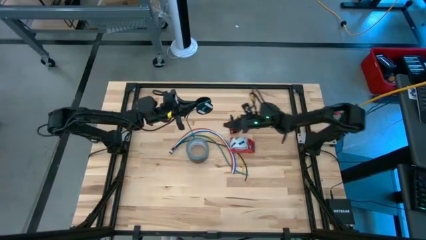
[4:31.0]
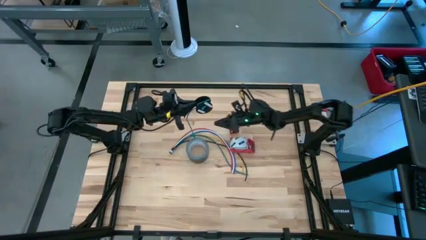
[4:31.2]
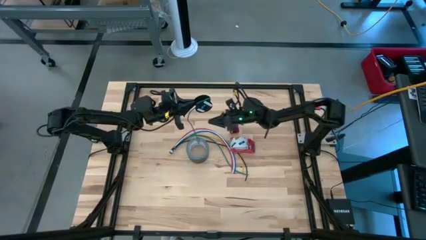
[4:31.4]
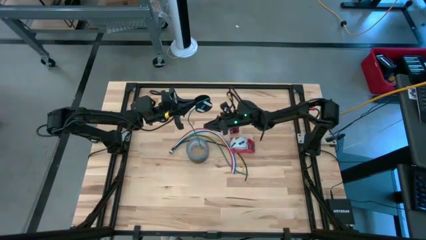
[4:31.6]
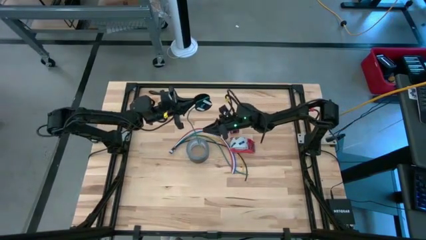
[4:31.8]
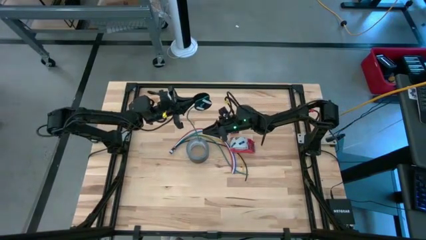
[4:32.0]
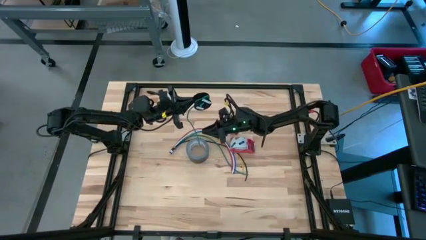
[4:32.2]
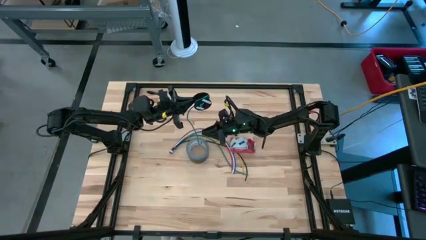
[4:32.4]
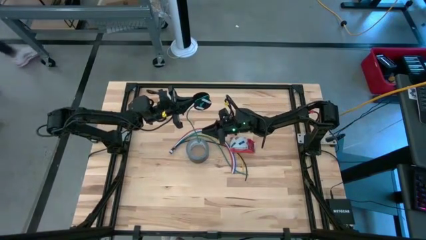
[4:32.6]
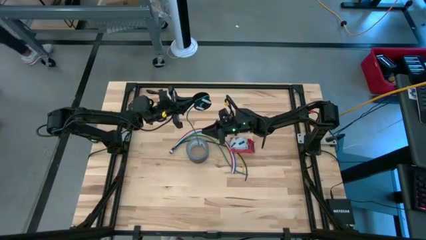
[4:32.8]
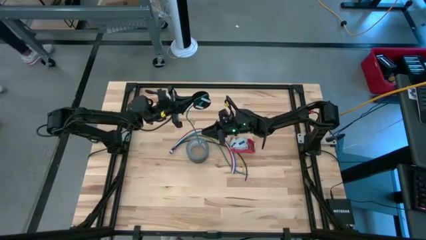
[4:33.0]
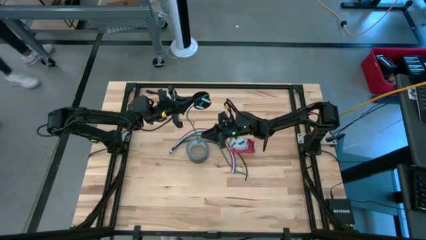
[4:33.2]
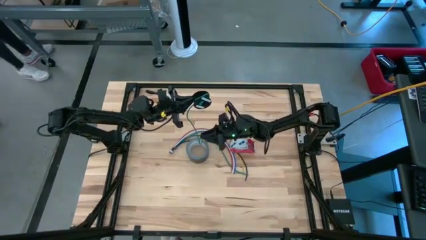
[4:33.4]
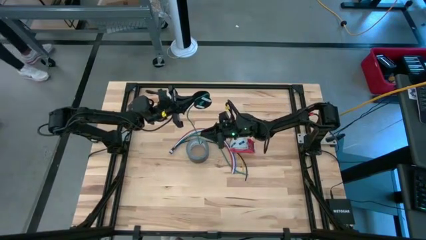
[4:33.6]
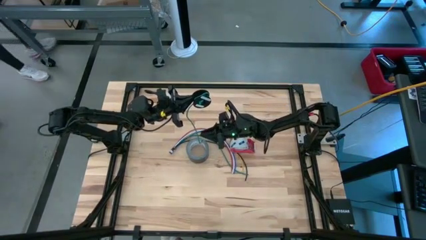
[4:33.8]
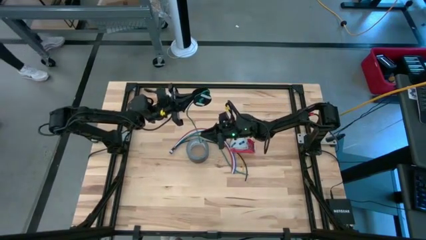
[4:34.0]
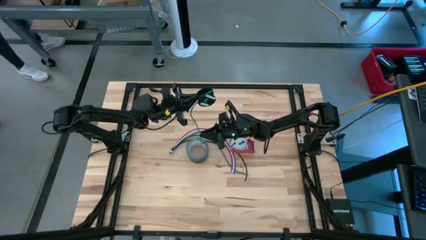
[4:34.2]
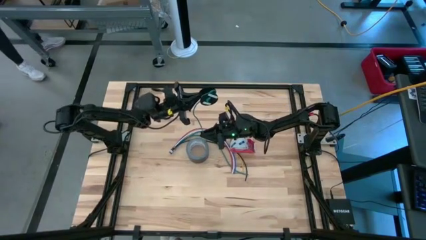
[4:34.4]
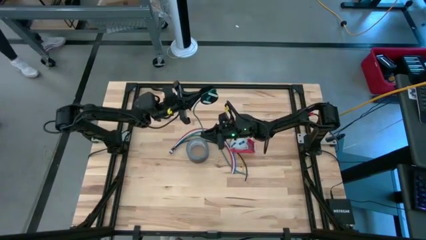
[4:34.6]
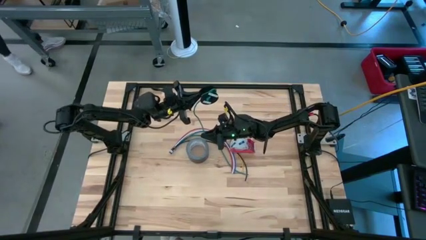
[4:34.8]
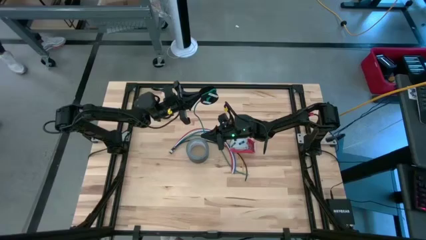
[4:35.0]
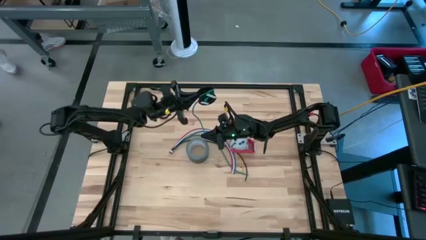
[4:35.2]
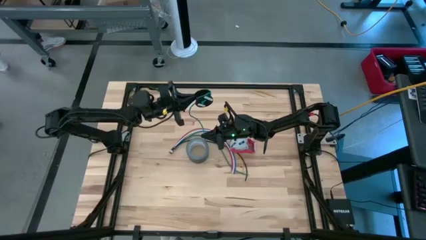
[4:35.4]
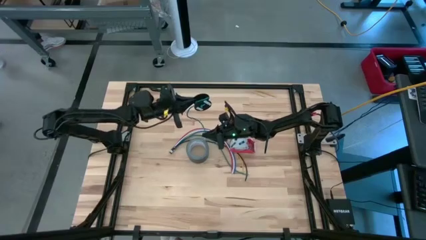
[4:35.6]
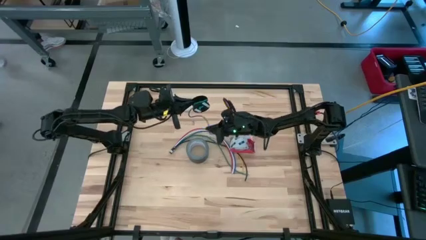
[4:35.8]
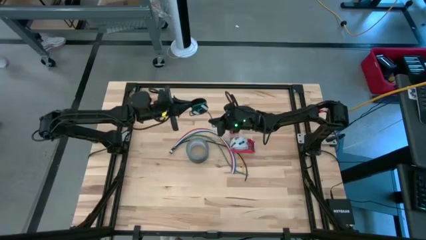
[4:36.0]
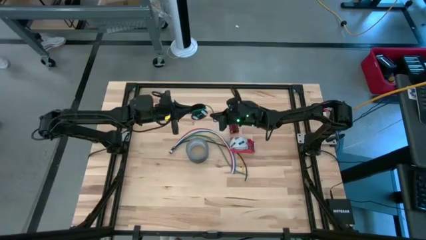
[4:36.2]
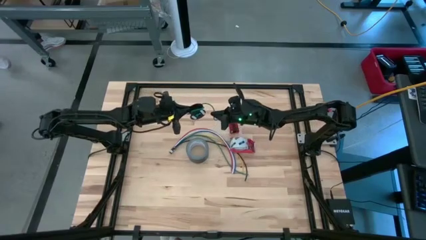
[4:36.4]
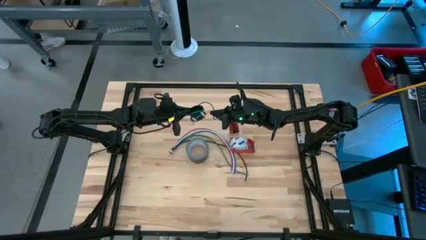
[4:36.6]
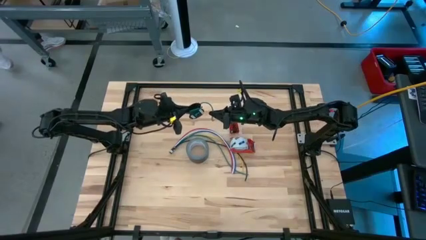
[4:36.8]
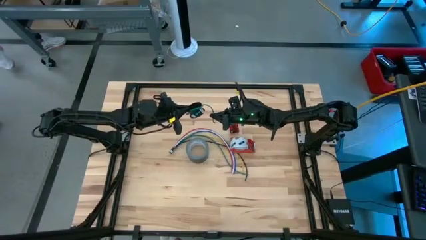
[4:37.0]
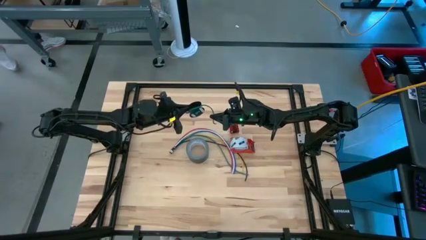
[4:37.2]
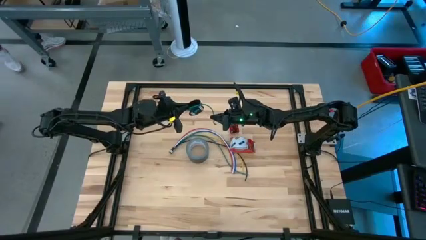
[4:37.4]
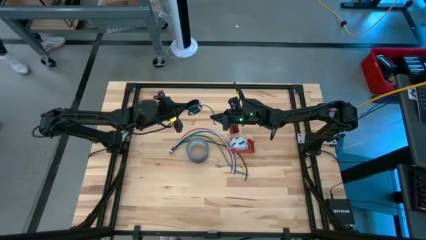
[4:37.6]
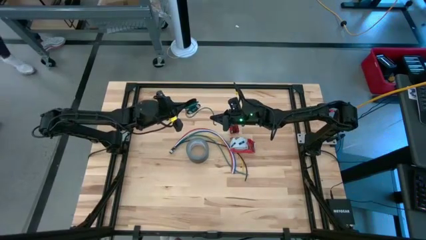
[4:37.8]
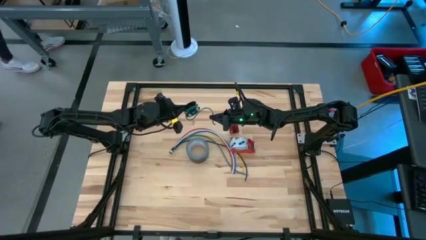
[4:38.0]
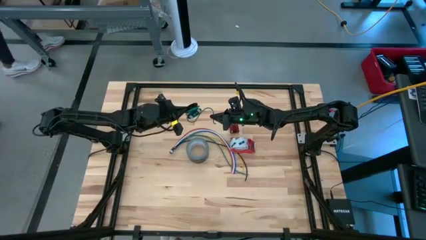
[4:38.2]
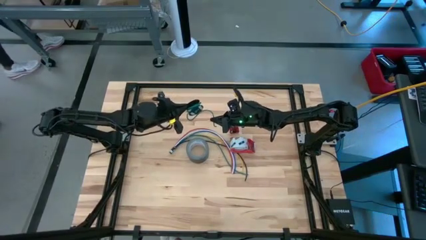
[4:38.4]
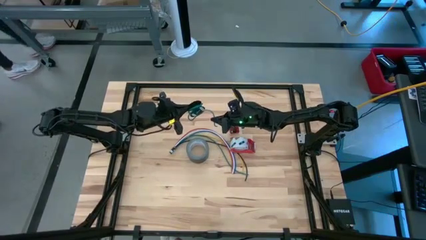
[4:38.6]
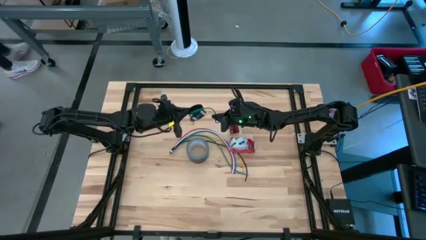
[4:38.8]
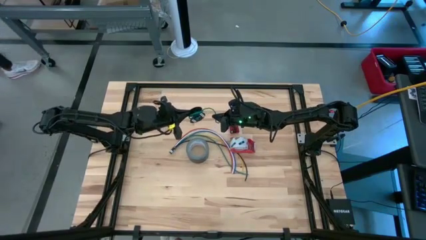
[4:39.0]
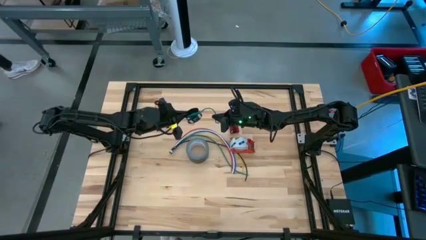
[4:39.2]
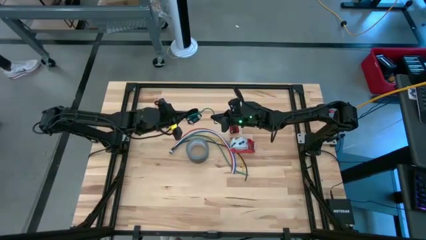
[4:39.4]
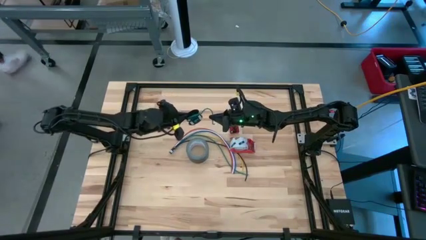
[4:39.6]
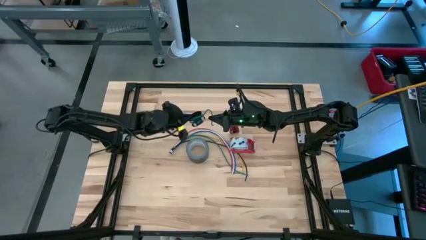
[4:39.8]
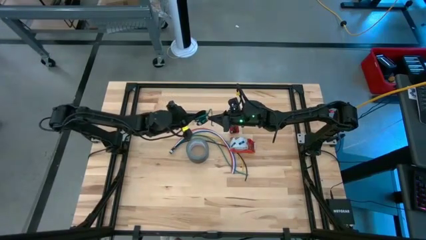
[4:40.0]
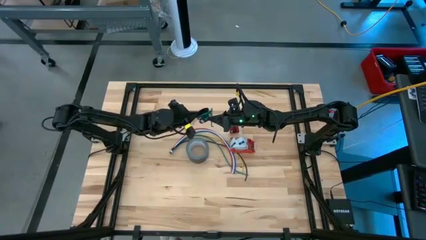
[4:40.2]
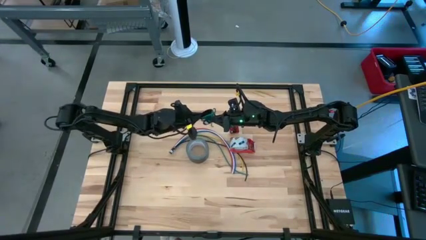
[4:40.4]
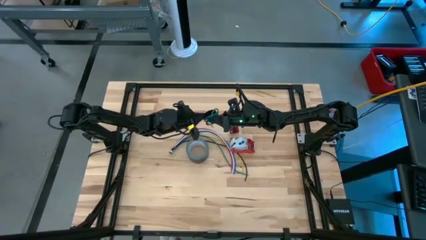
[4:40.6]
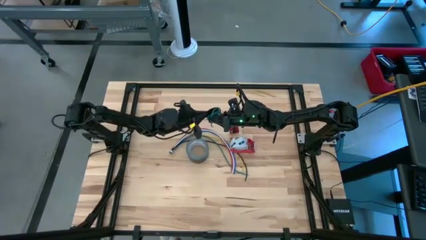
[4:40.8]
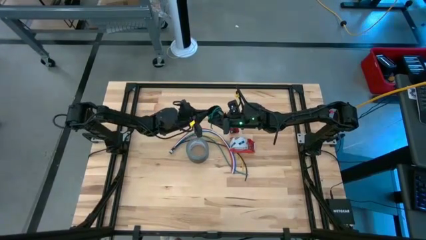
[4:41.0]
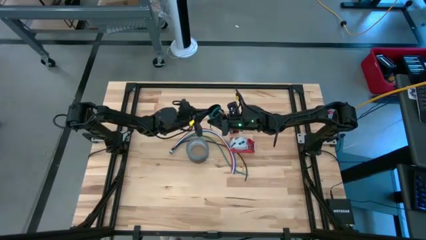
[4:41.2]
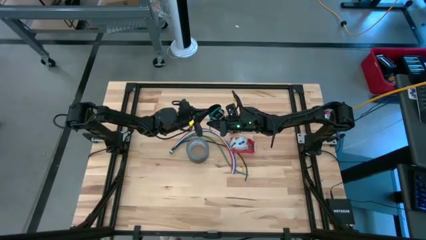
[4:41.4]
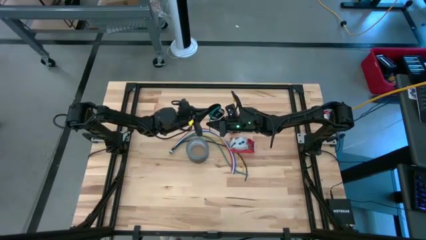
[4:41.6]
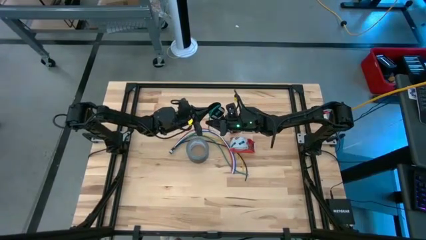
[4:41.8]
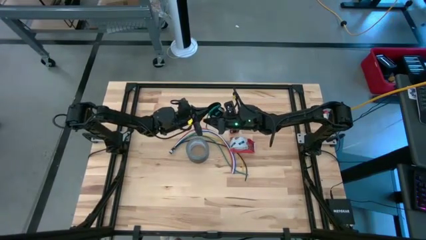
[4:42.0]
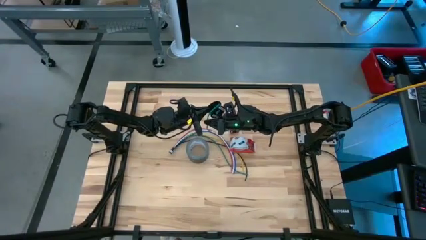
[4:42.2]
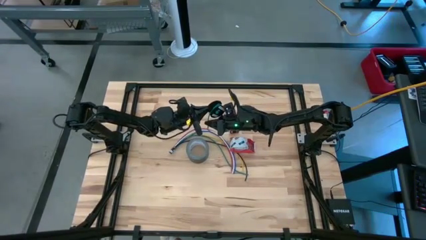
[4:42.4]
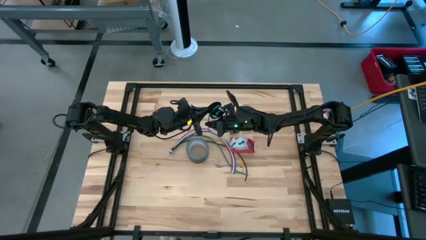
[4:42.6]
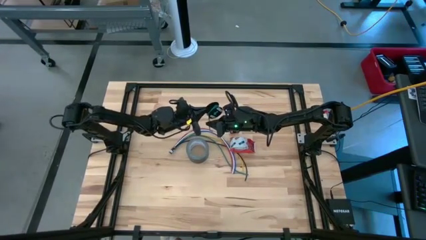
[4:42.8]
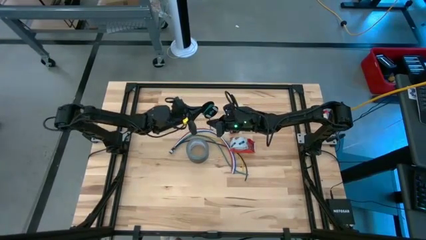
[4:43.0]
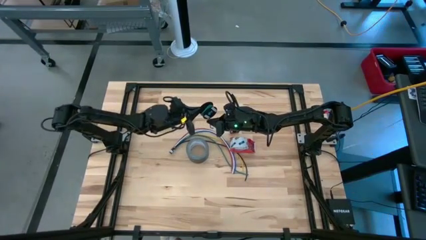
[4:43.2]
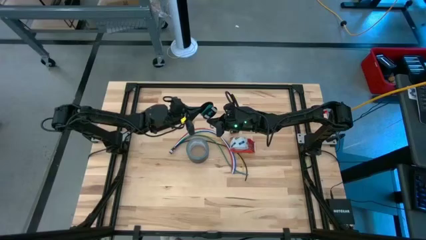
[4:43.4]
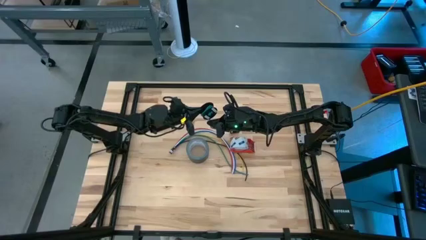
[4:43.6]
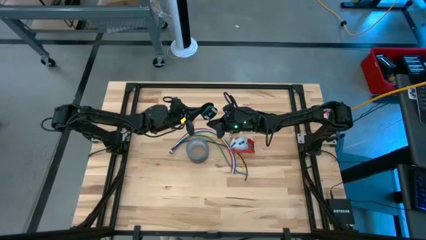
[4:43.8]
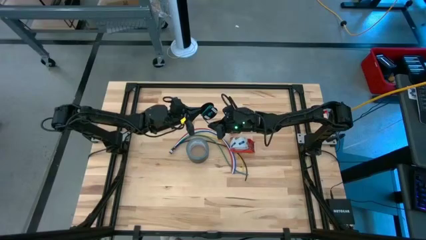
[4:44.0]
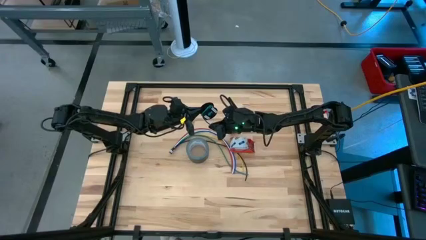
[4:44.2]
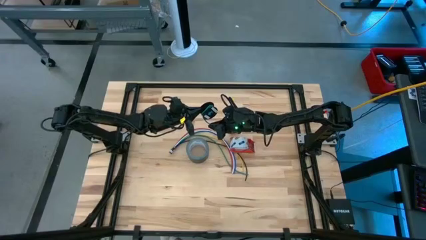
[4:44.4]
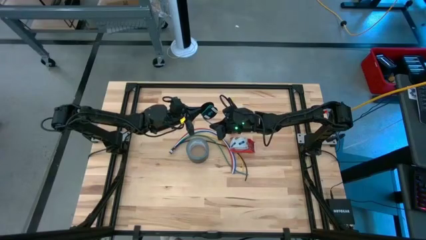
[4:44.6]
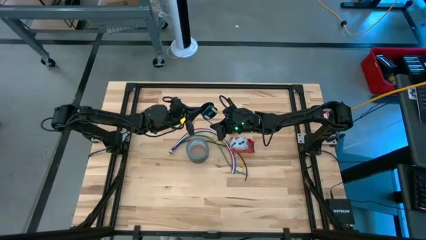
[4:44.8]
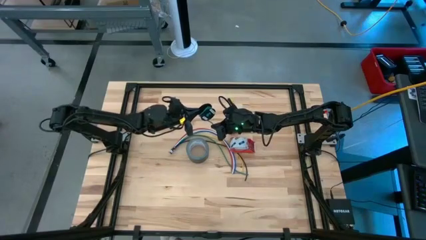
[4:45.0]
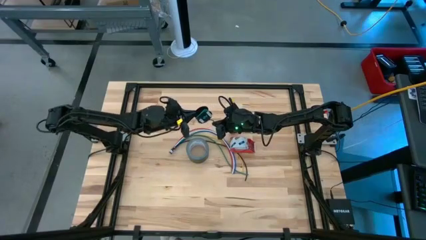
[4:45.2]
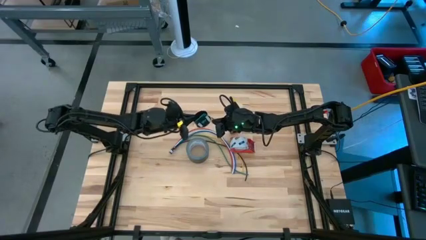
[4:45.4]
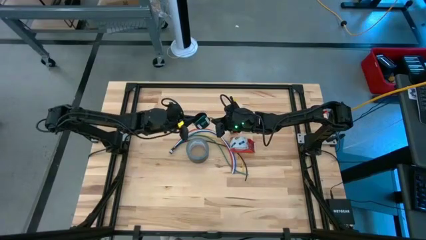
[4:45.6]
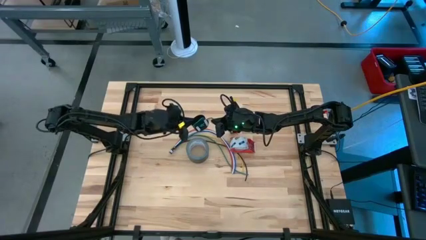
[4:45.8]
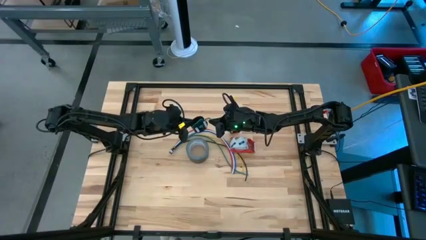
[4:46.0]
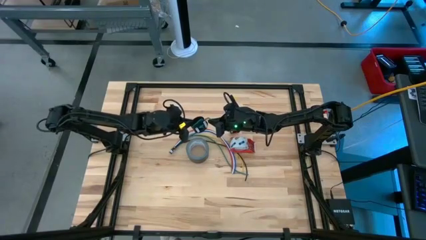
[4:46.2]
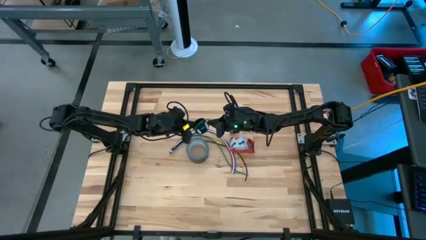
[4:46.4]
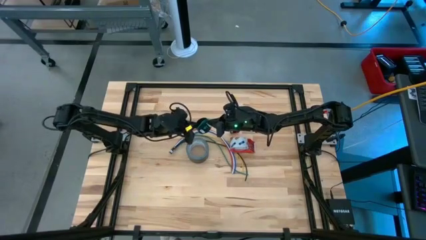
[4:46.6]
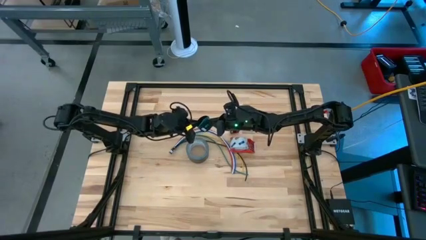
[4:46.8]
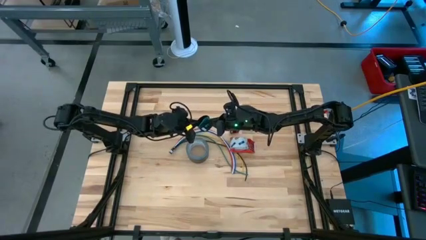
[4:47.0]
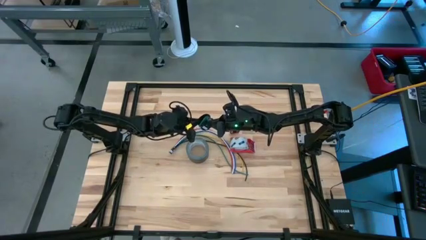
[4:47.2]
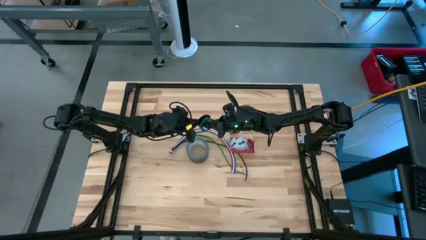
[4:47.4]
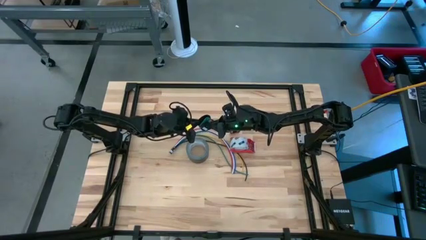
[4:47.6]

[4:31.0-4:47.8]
Task: Coil cords
Coil the green wire onto the black spool
